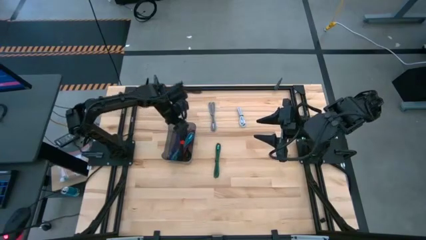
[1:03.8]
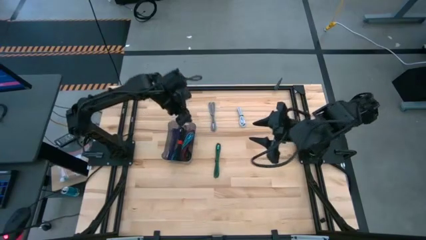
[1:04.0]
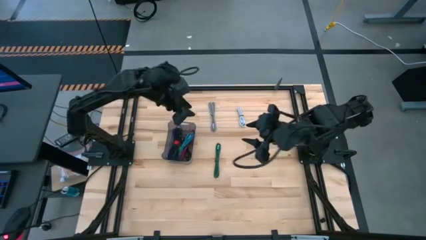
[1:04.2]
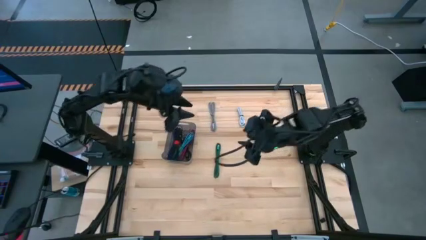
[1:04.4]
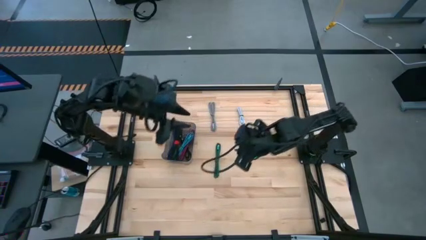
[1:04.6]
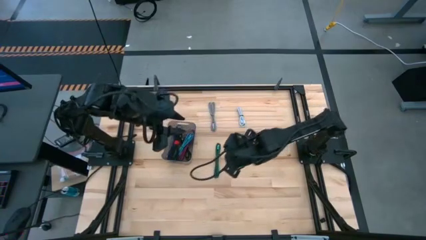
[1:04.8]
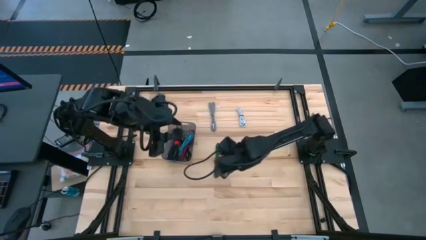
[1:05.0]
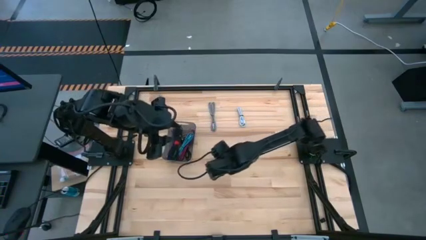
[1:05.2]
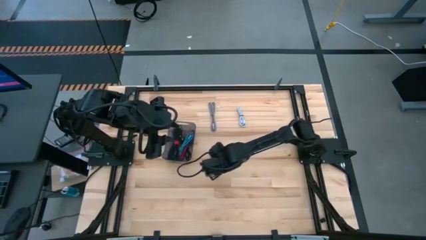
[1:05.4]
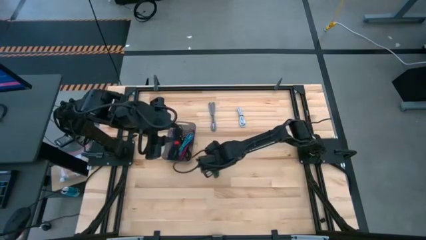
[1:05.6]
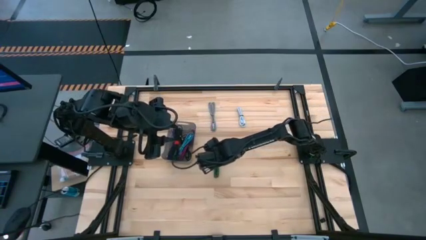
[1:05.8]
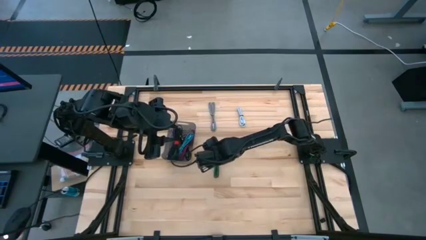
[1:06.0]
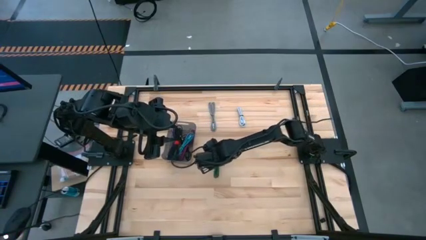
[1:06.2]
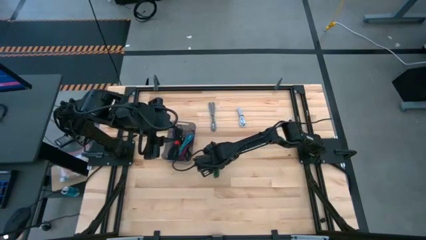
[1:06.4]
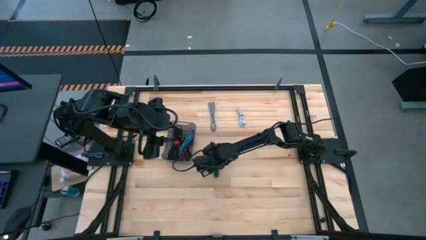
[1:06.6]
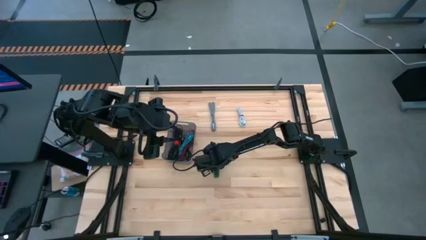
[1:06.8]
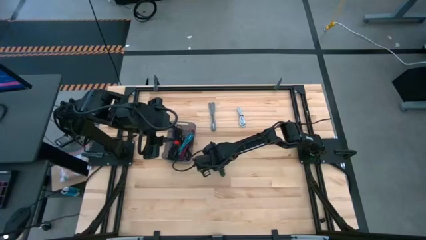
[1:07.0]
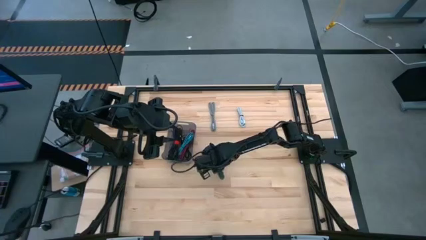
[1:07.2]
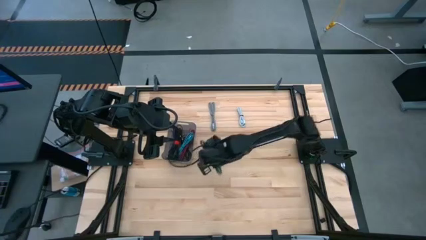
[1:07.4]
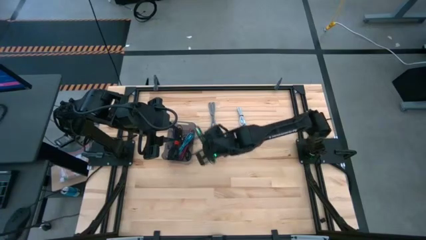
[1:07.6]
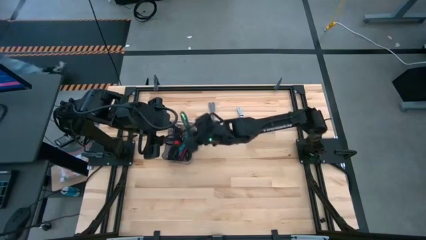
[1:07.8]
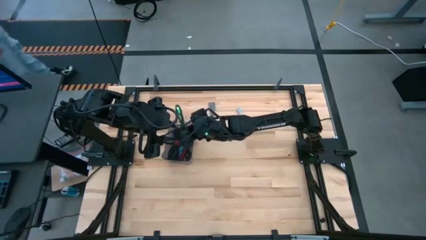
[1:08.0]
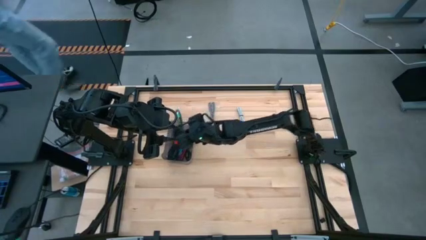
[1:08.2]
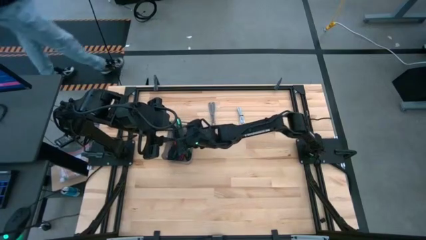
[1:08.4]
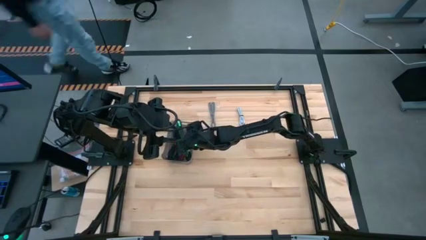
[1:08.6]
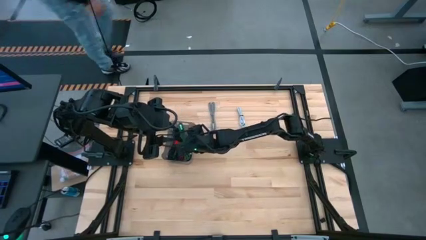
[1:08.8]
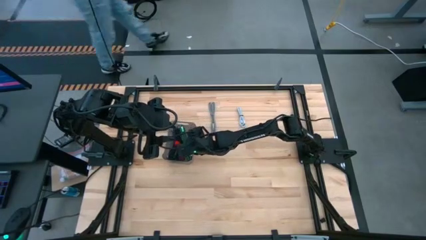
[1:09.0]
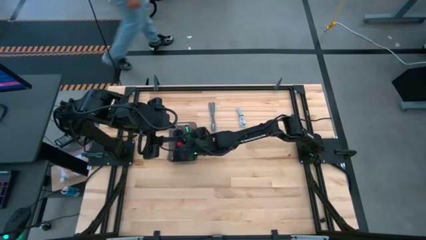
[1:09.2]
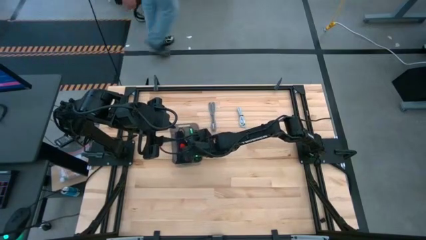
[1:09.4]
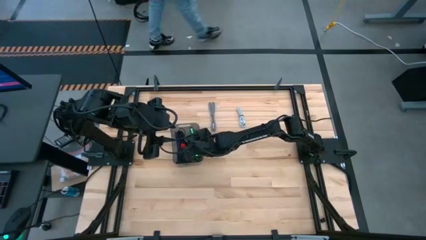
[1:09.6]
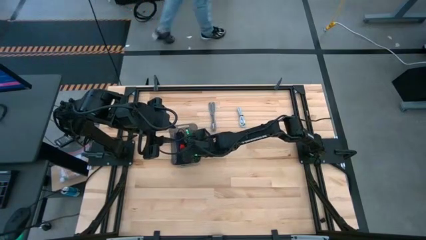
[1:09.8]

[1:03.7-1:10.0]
Task: Pick and place USB-C Cables
Put the green USB cable into the black bin

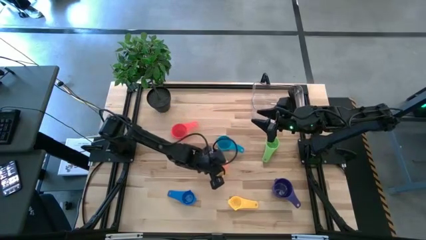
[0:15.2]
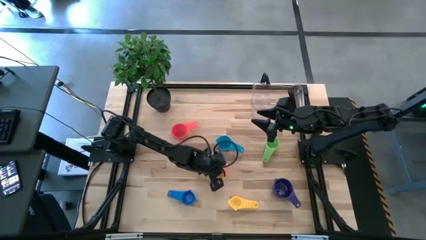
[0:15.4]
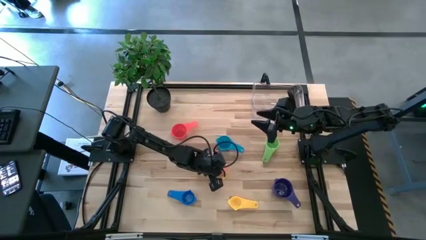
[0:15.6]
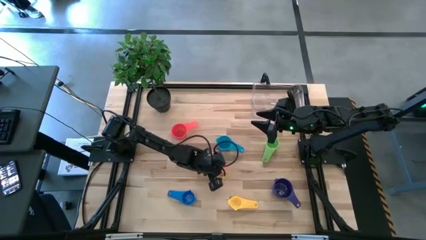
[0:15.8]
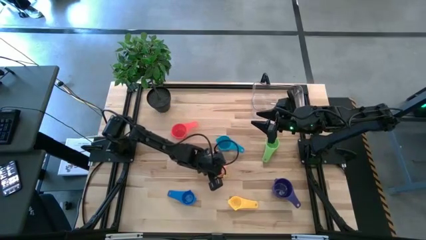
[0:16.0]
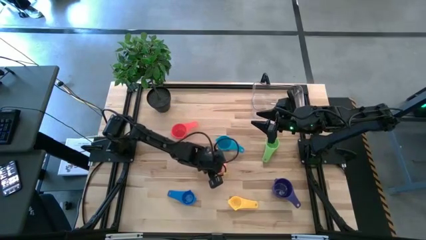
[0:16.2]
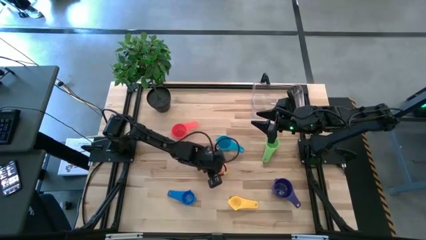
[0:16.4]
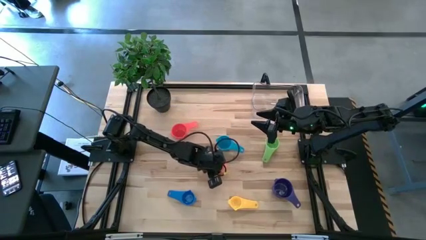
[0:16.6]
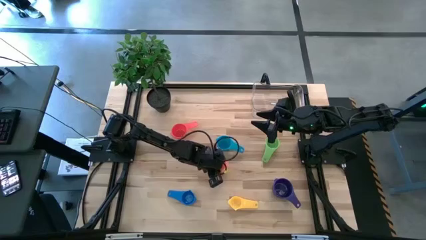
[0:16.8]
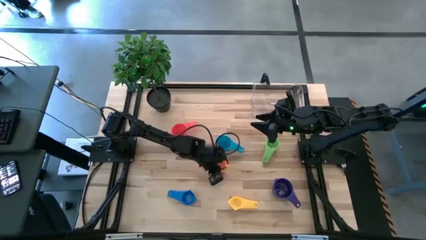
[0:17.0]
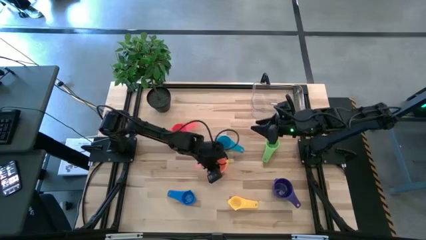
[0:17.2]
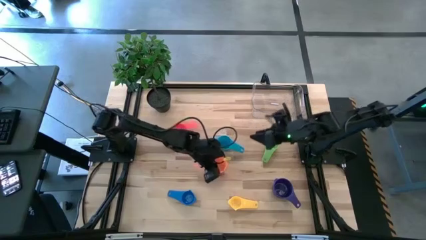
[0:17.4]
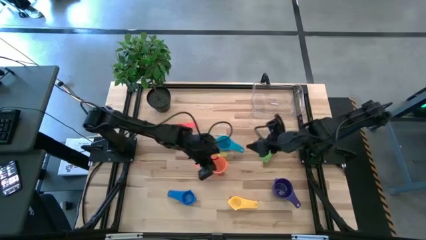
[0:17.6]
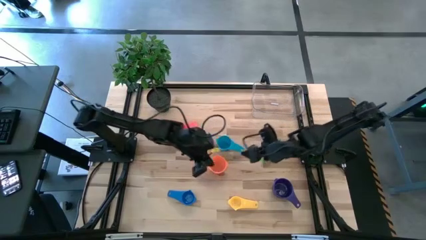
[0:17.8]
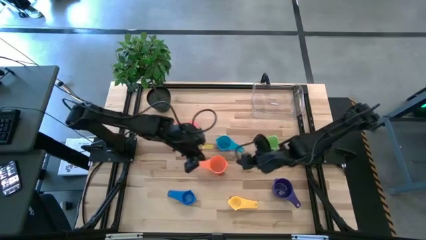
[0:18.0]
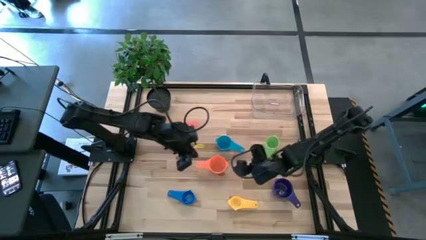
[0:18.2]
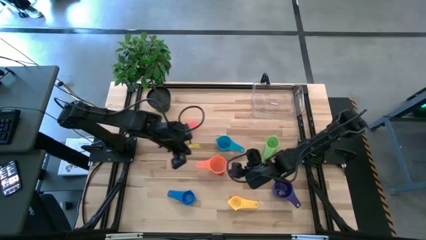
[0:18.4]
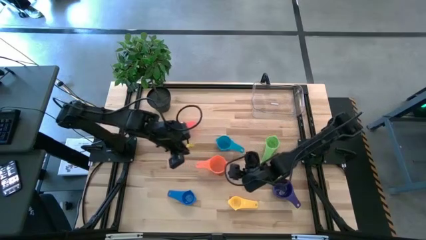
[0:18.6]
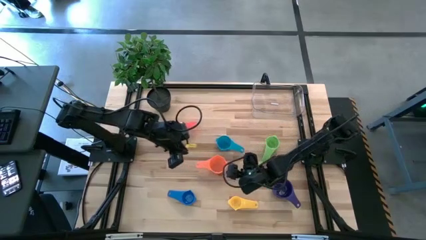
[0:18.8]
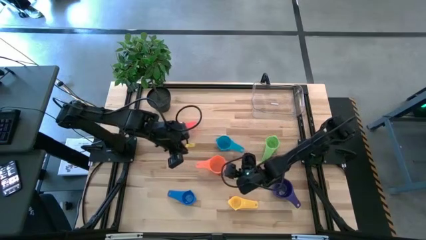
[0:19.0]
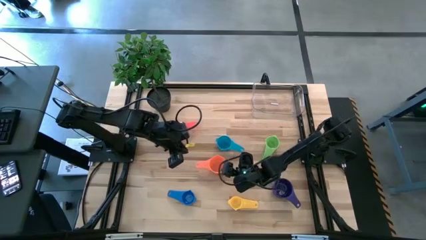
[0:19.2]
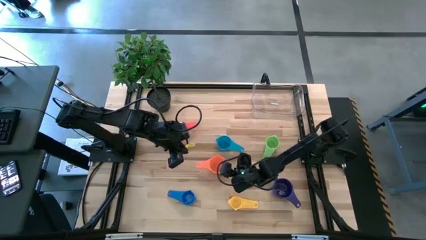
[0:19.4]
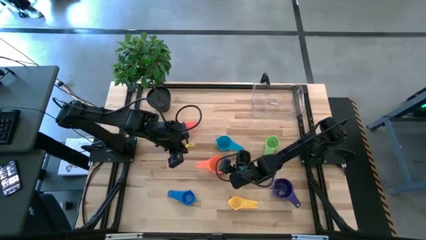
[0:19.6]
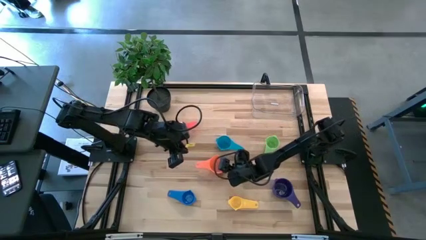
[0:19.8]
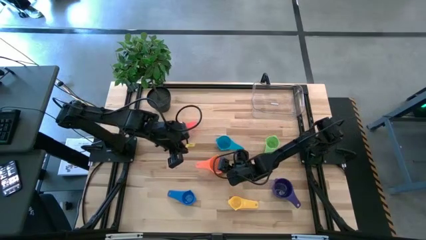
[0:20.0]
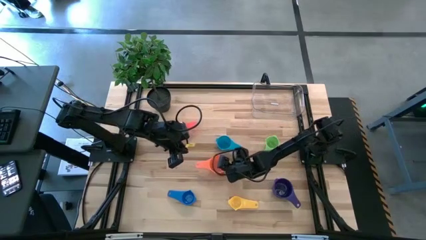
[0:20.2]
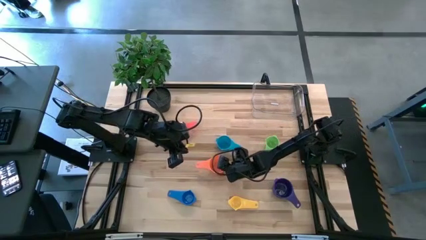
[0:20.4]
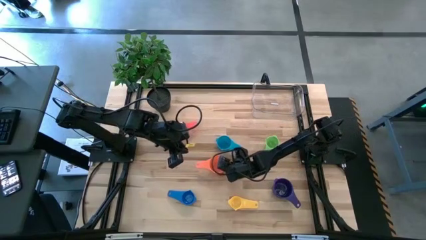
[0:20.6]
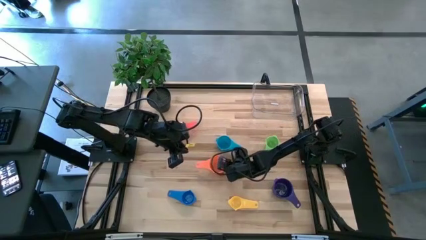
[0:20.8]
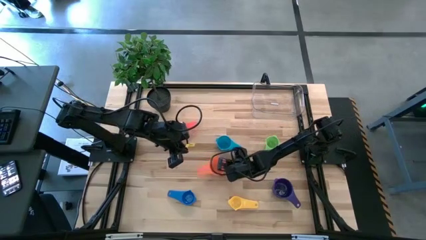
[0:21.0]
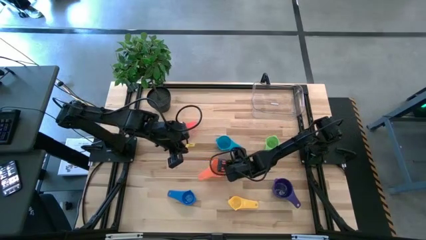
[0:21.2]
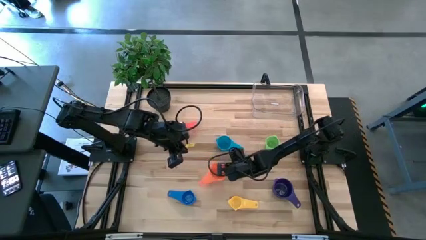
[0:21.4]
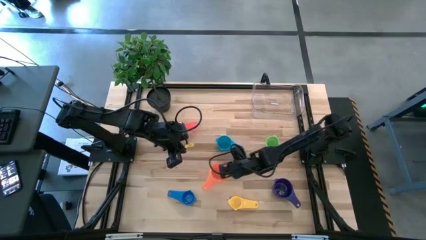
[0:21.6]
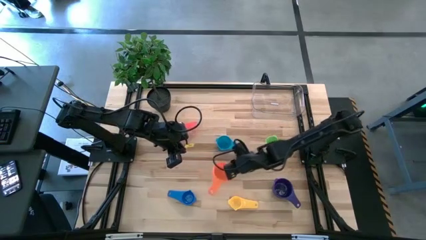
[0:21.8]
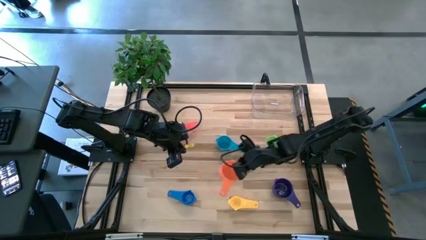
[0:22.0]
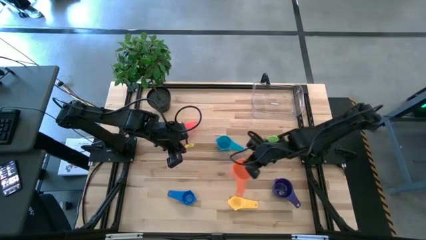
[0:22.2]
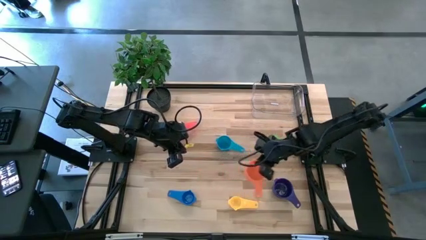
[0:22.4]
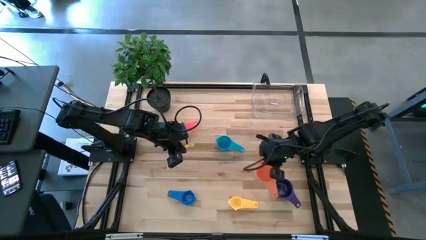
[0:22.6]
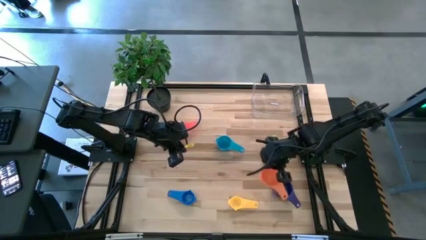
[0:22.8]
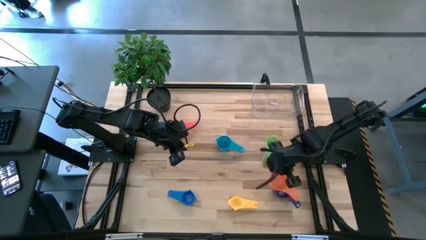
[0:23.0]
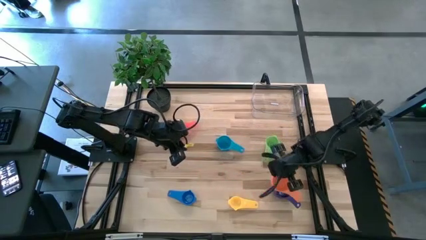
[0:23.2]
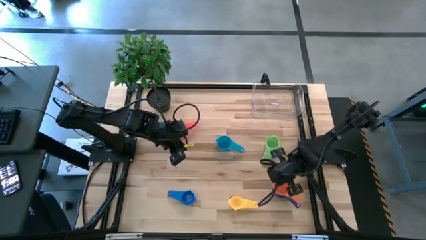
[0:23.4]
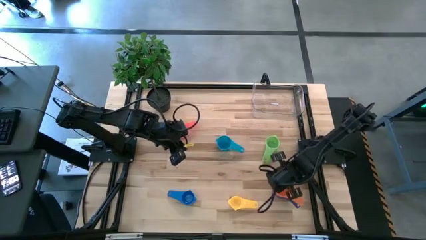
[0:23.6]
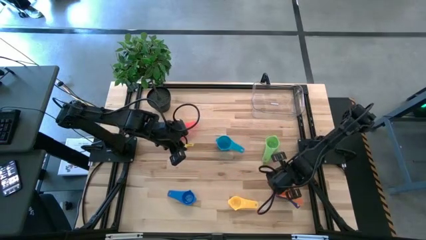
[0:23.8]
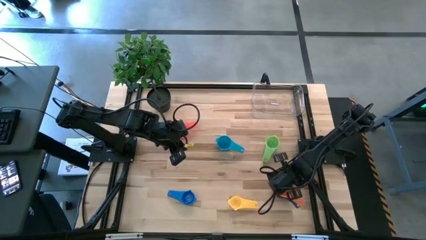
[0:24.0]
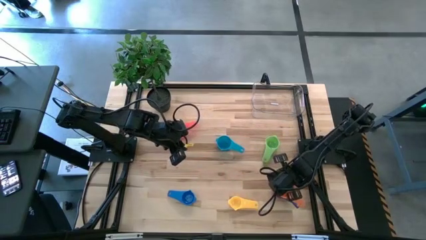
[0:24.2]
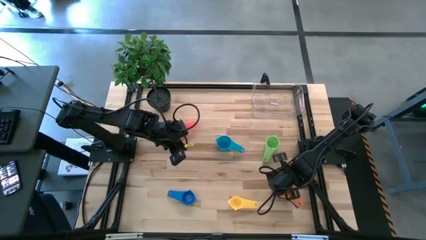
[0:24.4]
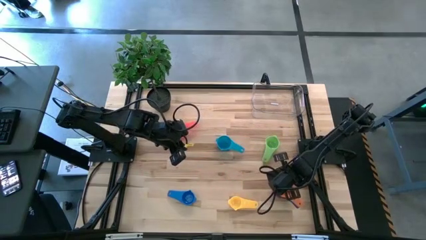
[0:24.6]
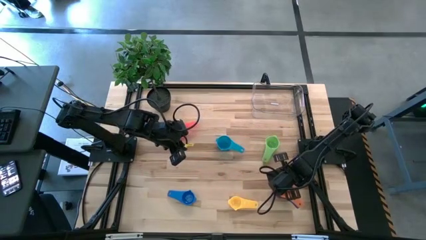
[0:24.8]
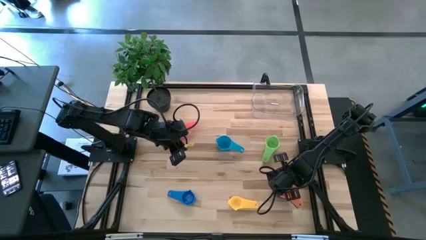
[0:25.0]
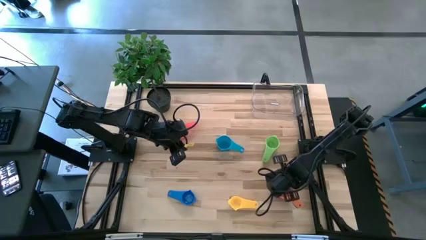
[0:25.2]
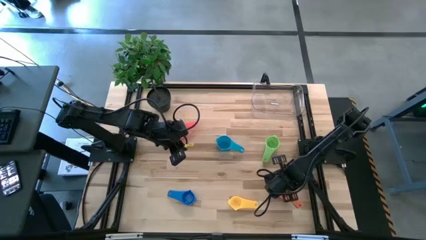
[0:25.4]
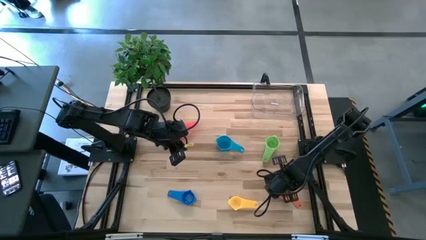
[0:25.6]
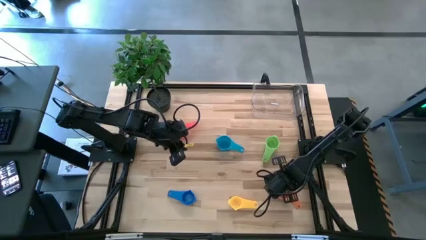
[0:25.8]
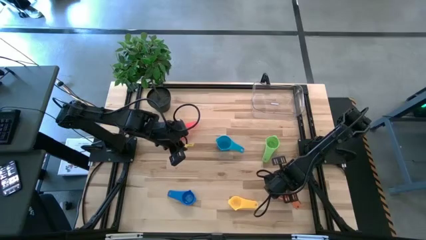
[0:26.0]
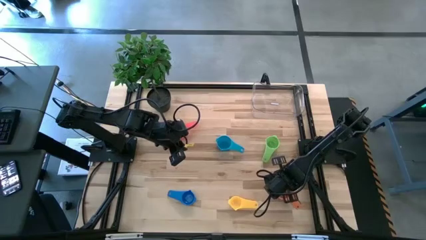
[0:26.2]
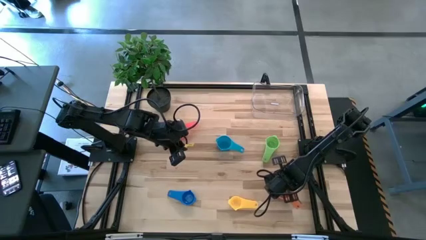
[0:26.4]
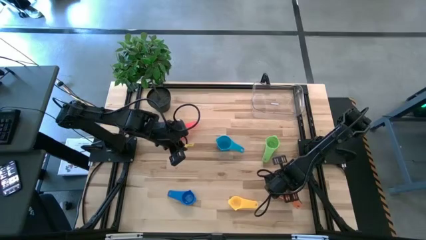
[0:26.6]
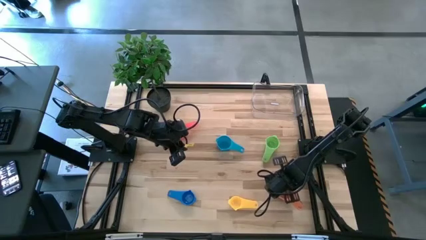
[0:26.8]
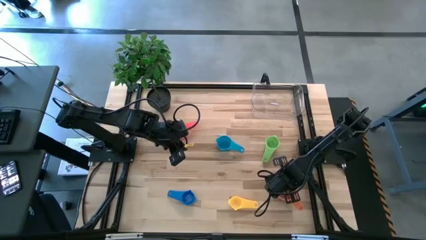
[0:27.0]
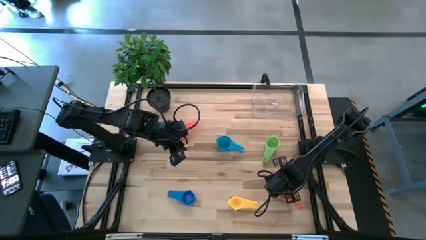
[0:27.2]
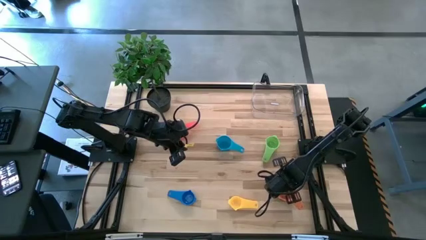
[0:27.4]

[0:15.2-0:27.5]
Task: Nest measuring cups in basket
Stack the orange measuring cup on top of the purple measuring cup
